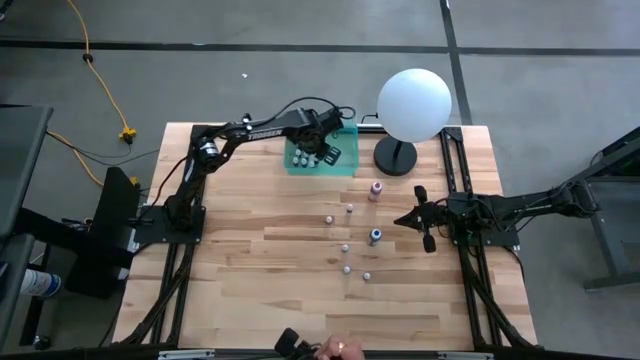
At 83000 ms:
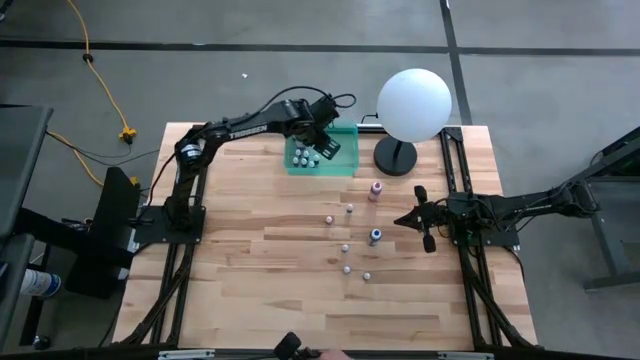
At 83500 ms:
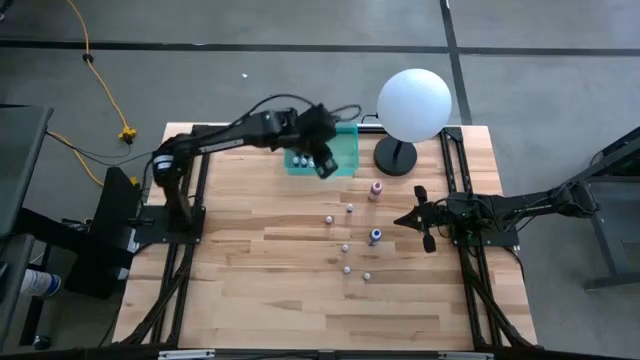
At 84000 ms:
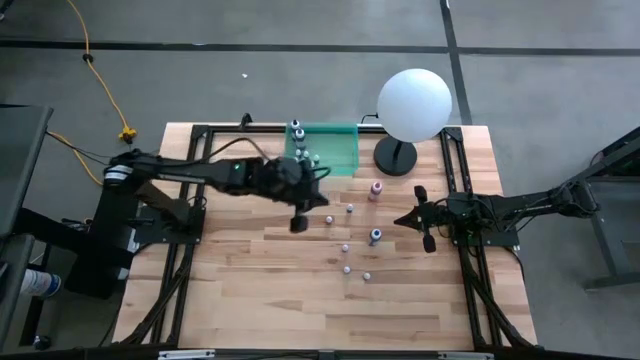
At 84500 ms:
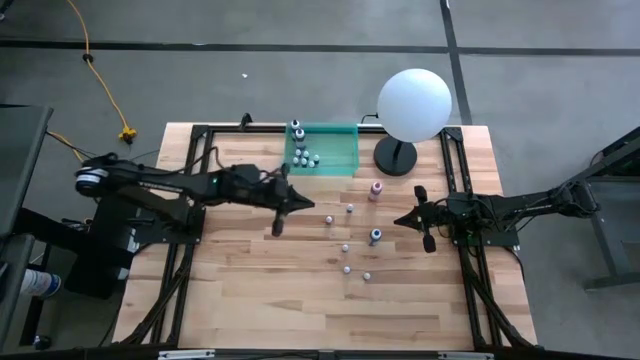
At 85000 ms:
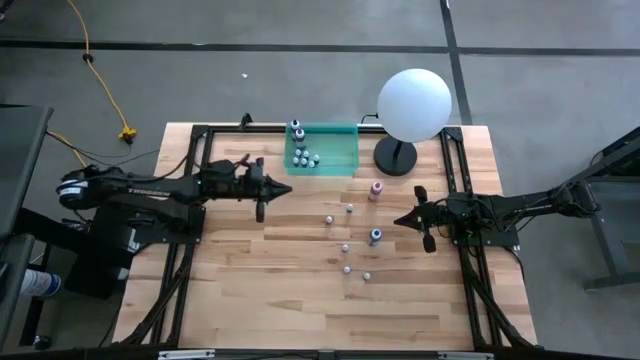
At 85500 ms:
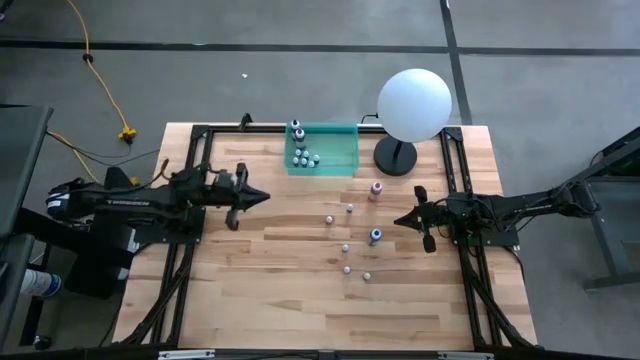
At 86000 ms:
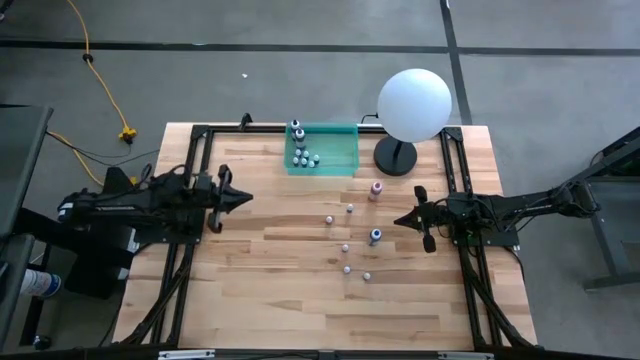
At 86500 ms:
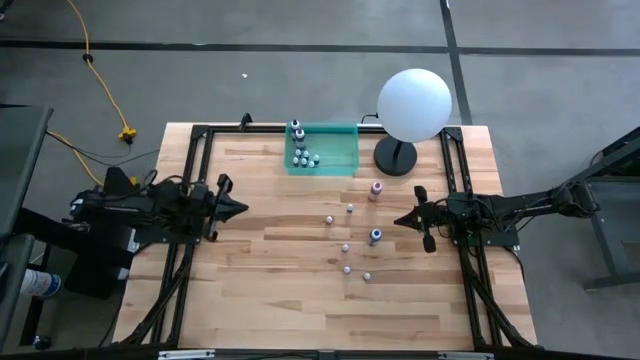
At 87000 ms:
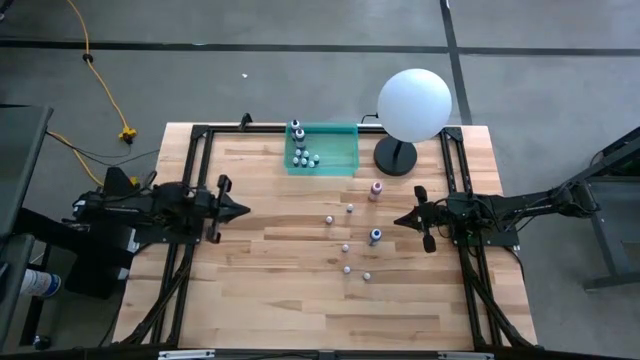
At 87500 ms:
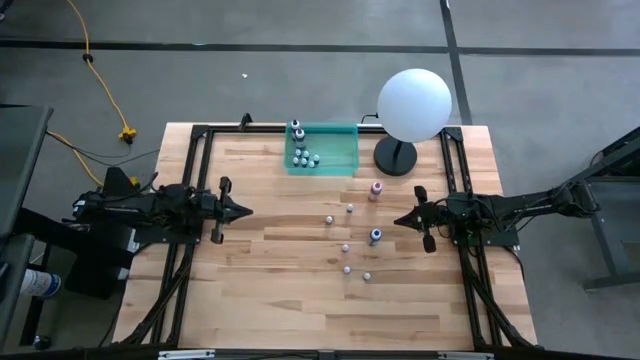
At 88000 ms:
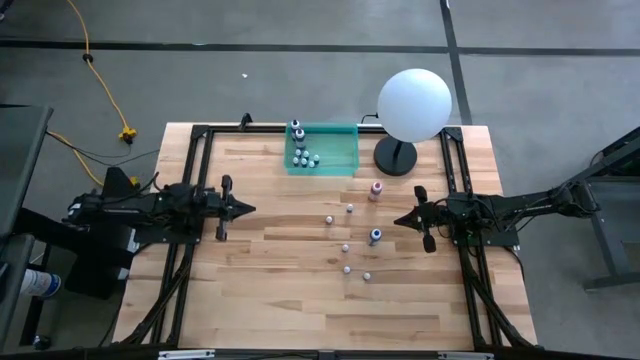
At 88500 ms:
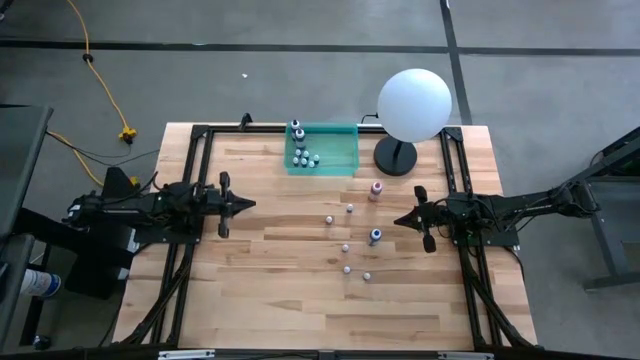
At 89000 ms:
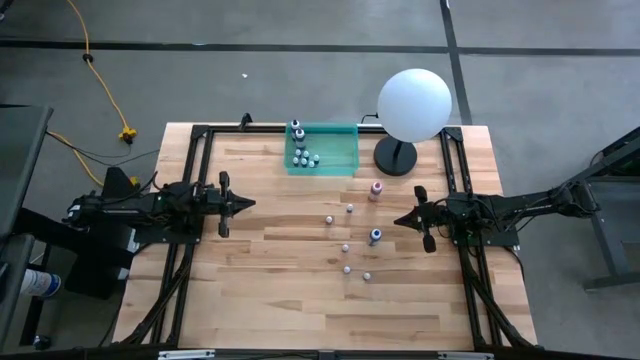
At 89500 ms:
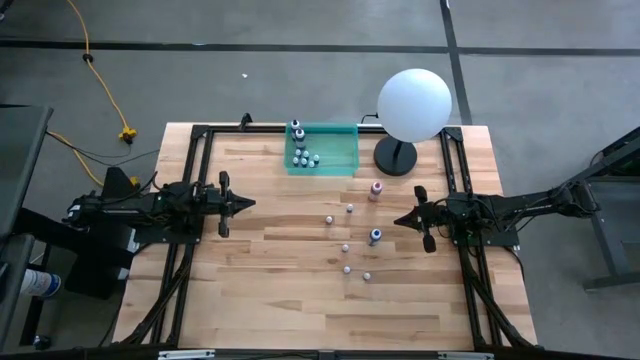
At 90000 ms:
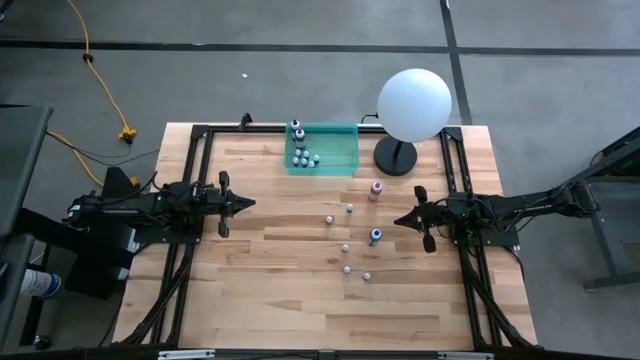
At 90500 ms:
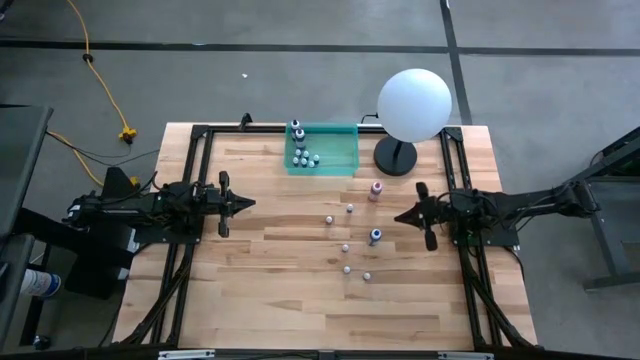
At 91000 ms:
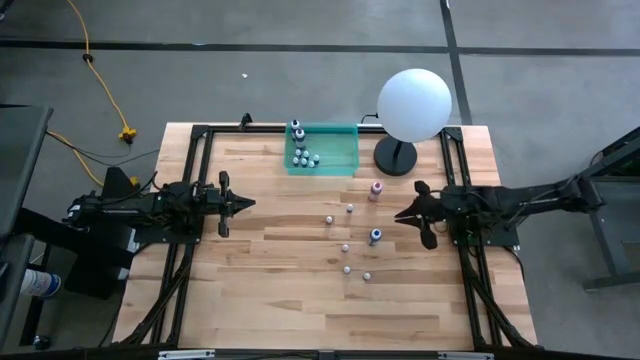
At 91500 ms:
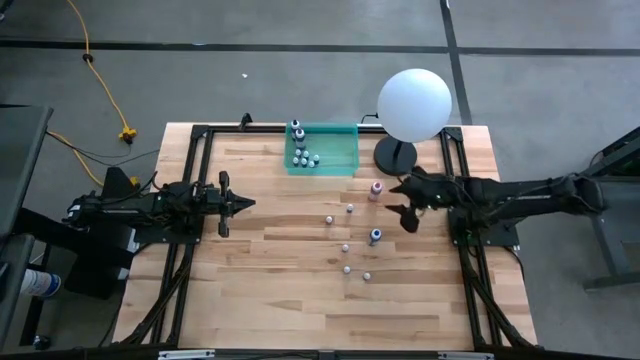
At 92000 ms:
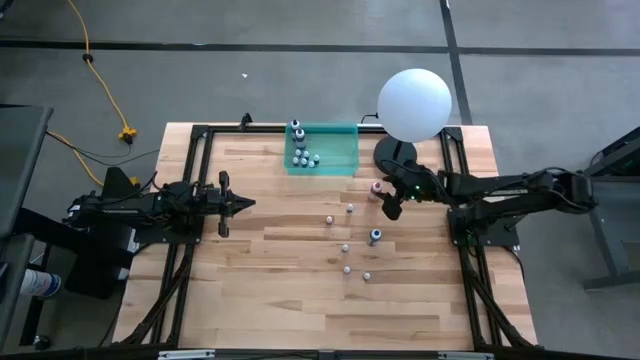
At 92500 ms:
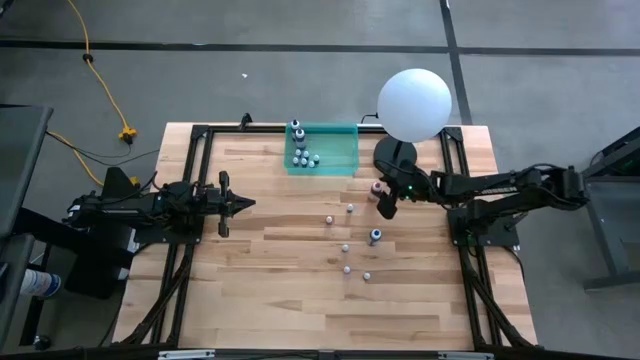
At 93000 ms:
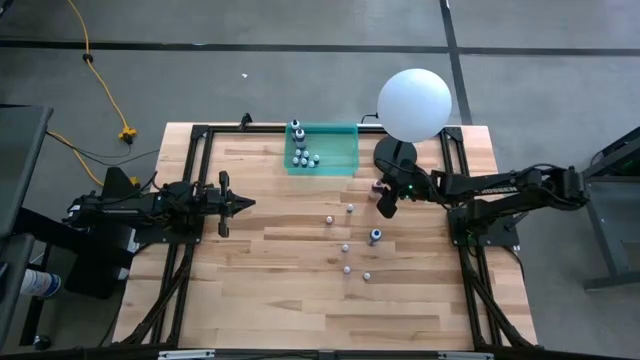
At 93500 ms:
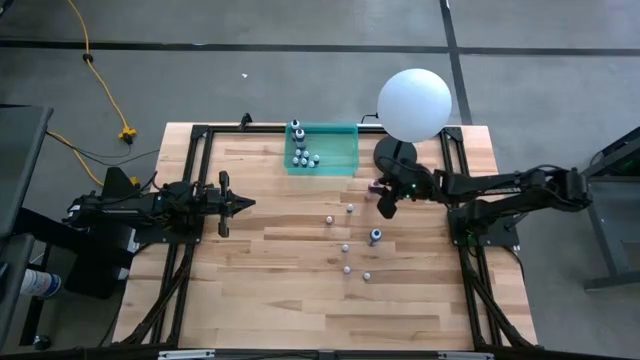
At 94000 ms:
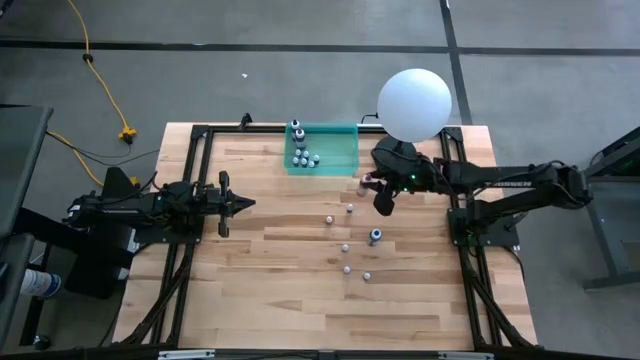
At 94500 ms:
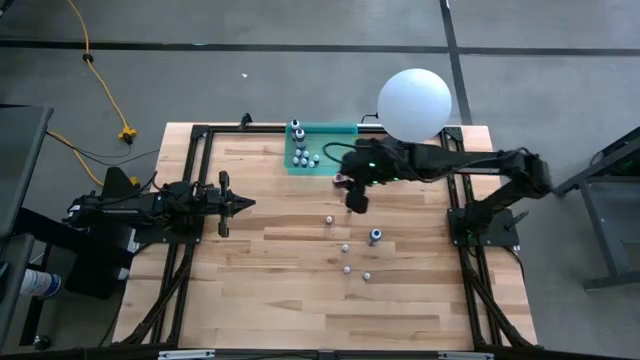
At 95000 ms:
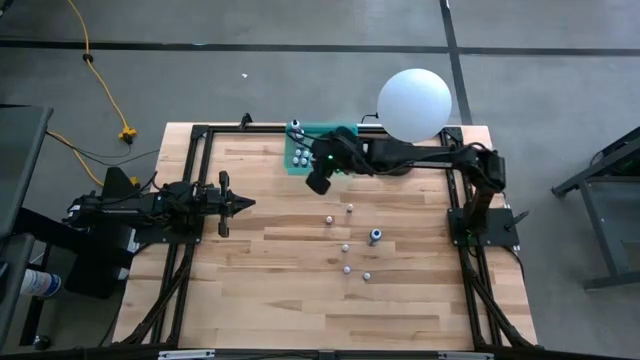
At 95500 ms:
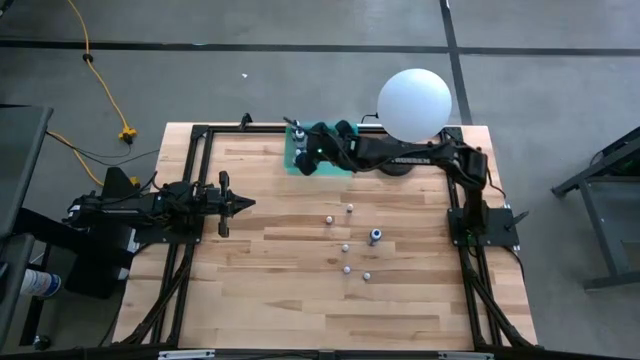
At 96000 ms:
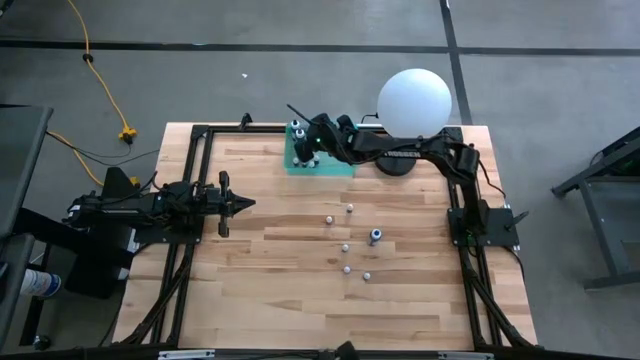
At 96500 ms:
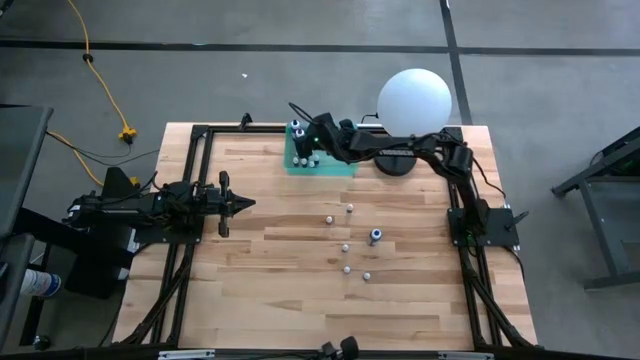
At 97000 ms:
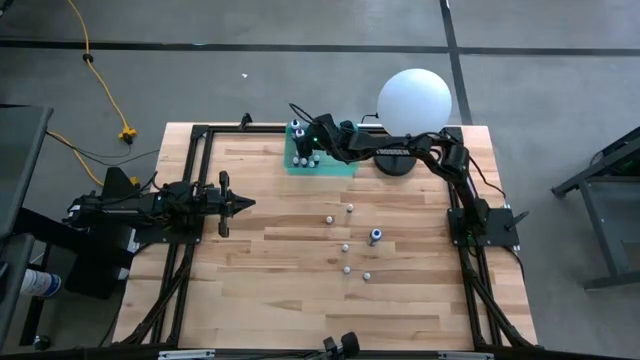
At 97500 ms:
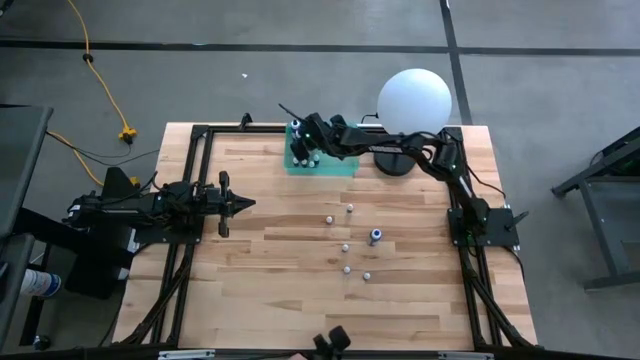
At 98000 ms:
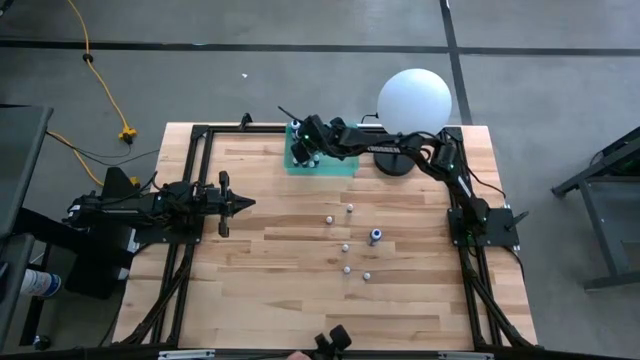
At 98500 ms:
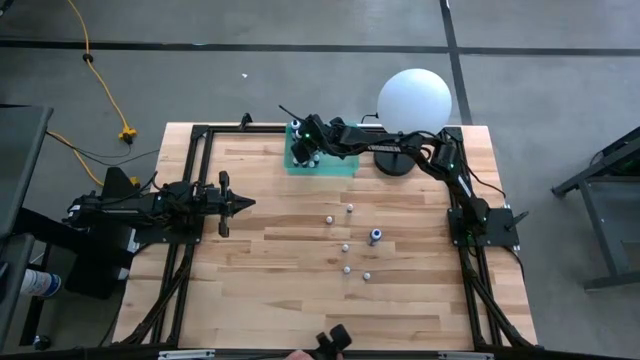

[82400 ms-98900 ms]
Task: Pick & Place food coloring
Put the big pink food coloring bottle into the bin

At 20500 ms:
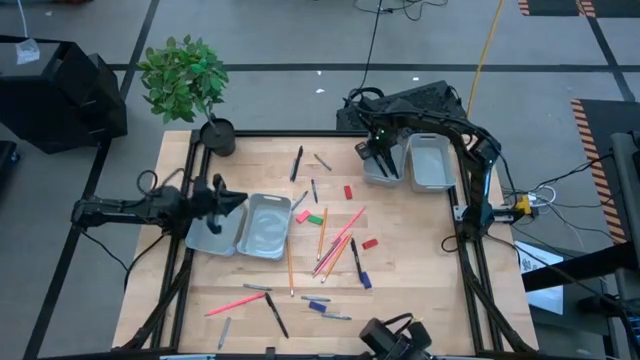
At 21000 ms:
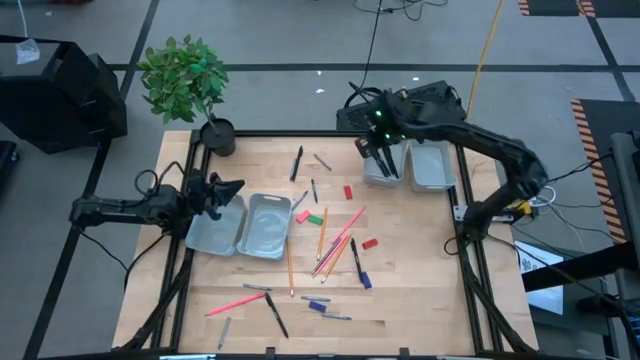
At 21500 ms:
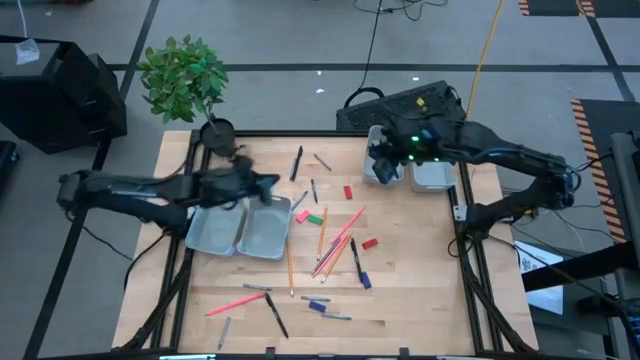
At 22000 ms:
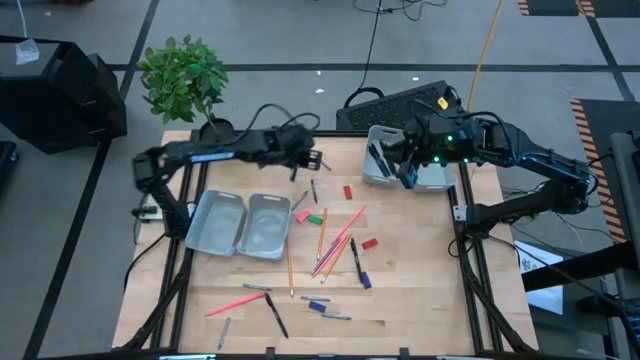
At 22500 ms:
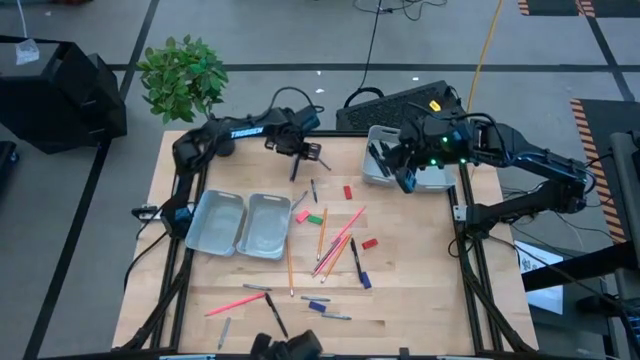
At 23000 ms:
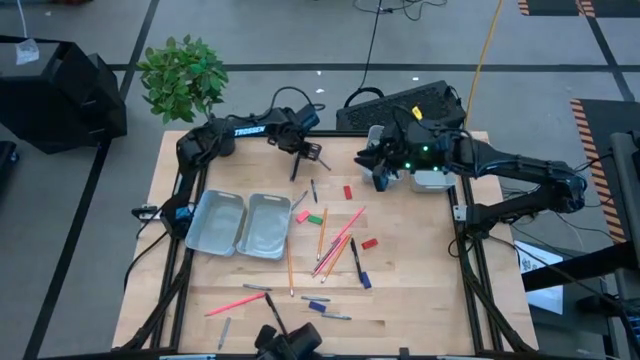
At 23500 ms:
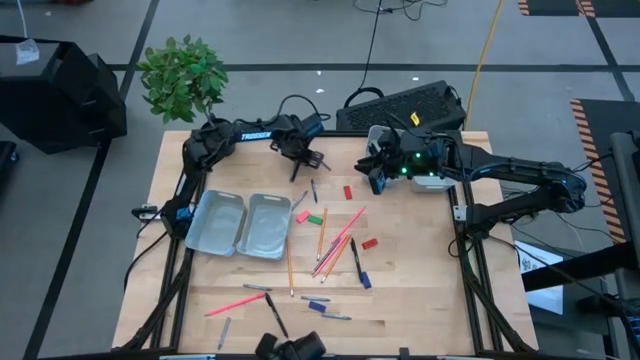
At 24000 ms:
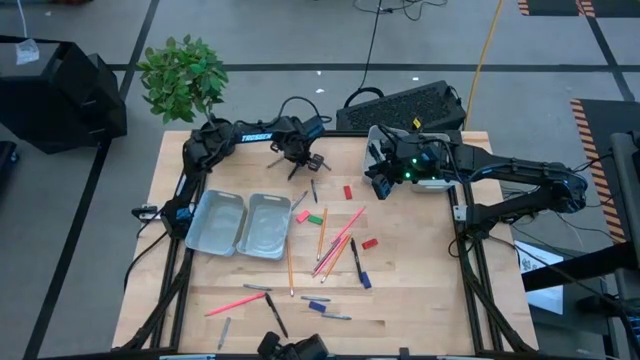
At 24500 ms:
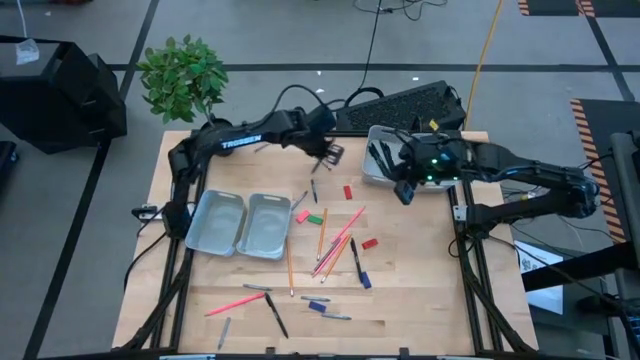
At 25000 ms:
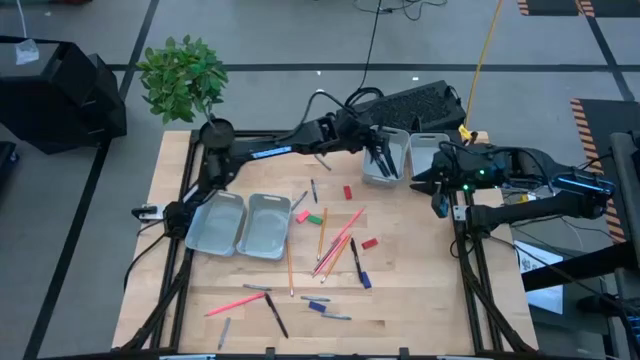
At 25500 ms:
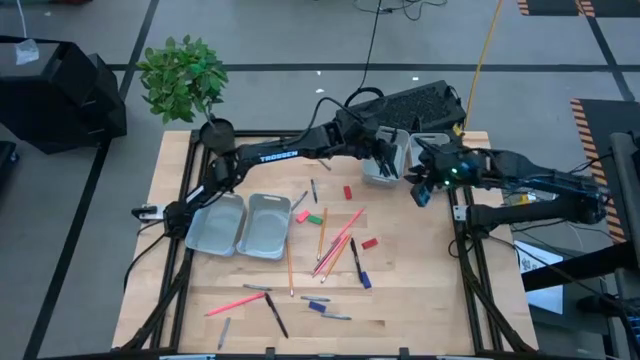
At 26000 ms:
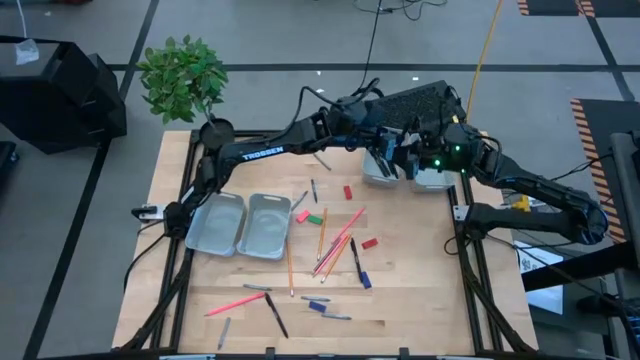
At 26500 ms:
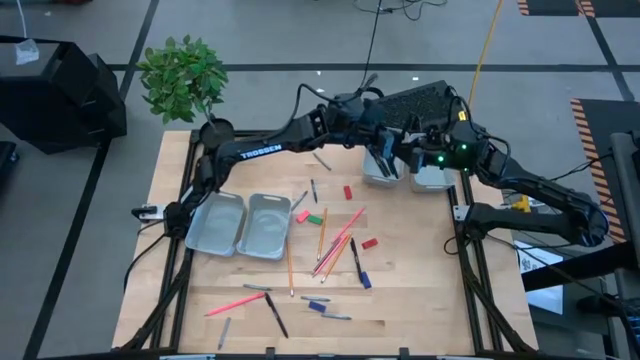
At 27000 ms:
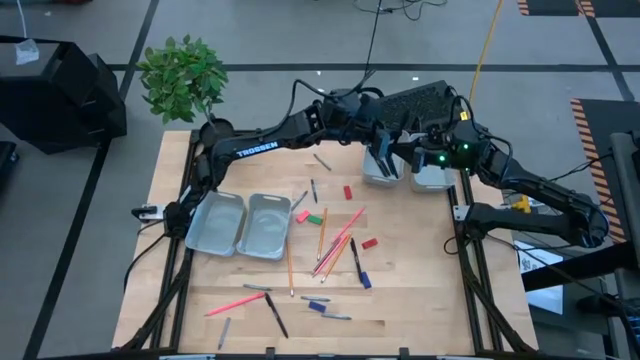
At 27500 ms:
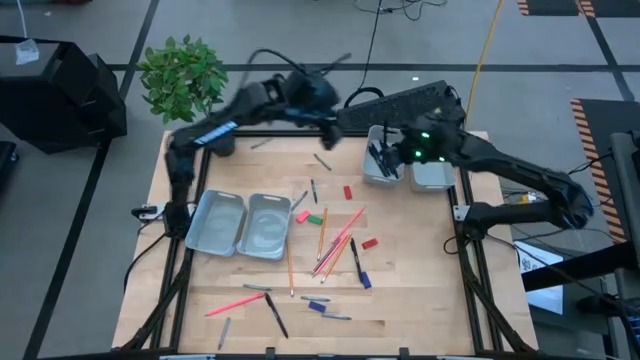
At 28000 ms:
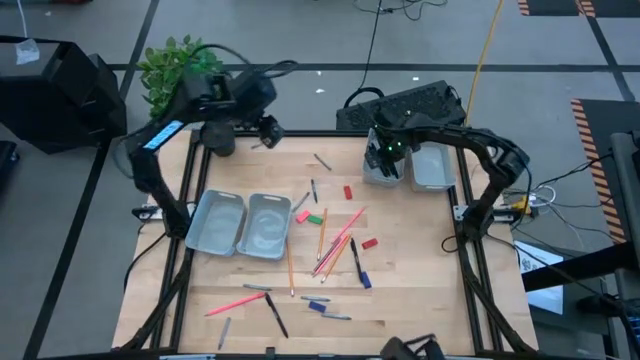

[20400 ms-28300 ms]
Task: Sort crayons/erasers/pens/pencils in bins
Put the black pen into the top left gray bin
